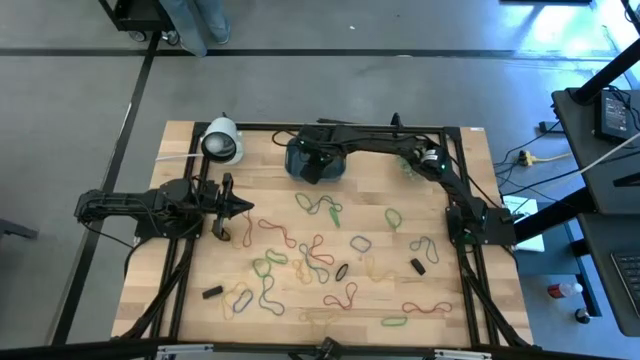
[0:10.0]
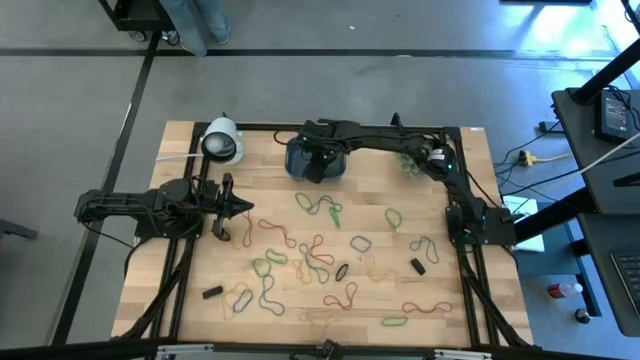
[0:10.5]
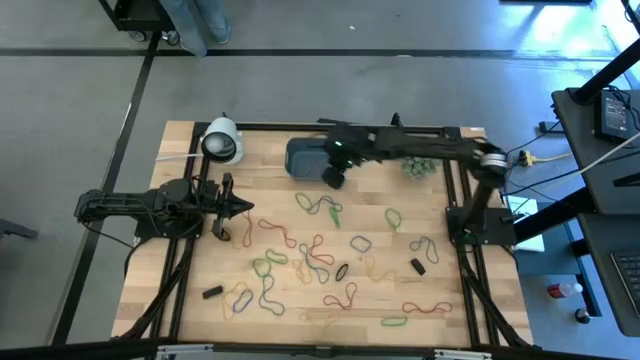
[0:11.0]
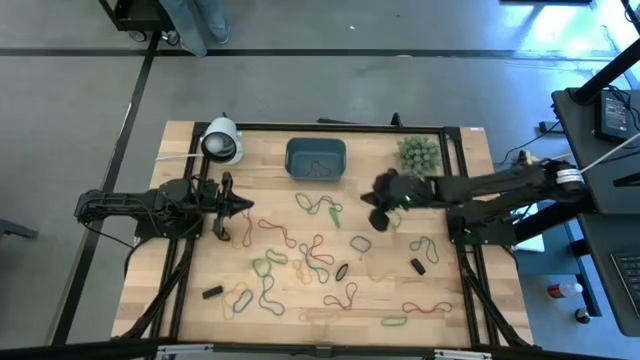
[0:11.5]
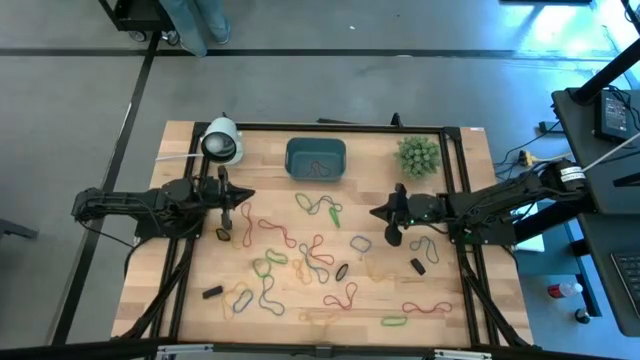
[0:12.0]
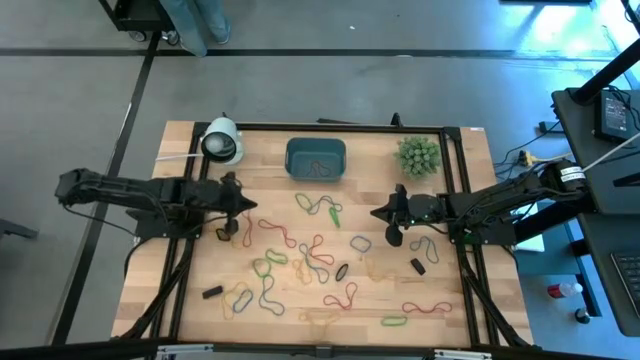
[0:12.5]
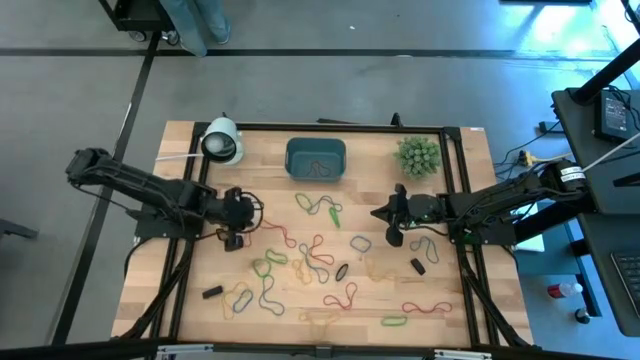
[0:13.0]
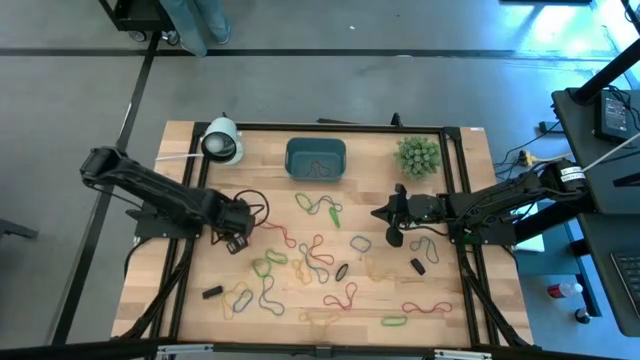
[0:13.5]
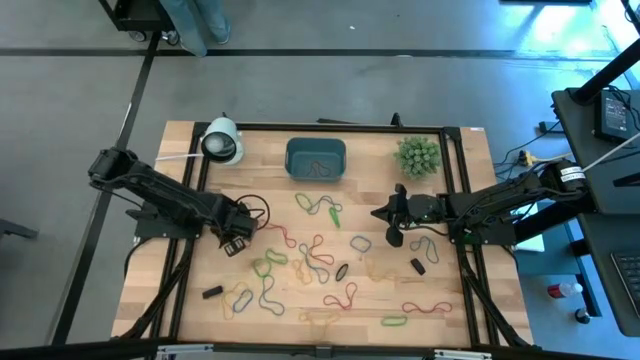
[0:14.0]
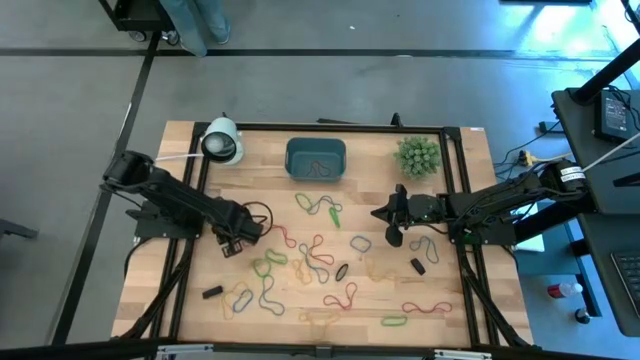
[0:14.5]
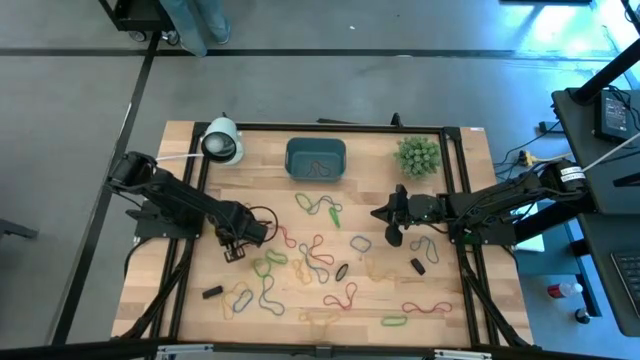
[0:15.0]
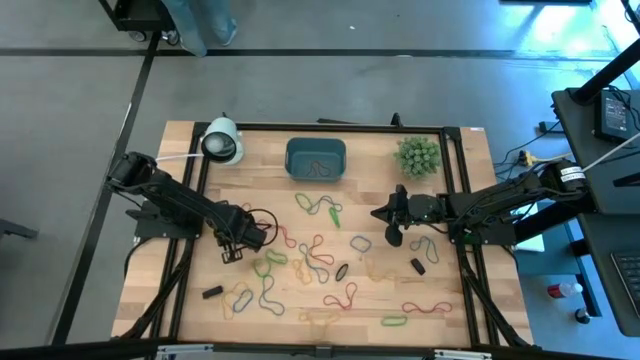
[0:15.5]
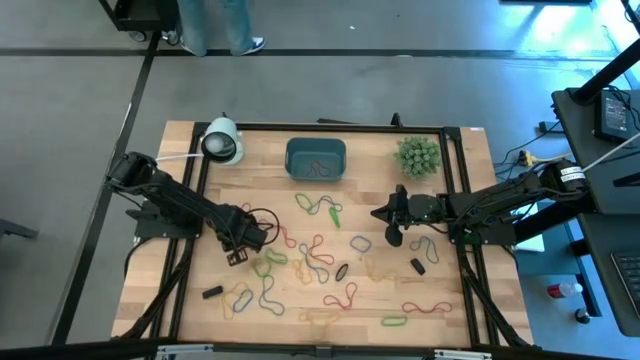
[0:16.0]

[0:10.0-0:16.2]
Task: Pick and place rubber bands into bin
Put the black rubber band into the blue bin

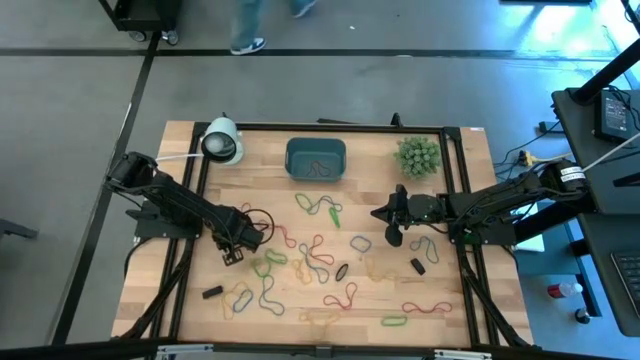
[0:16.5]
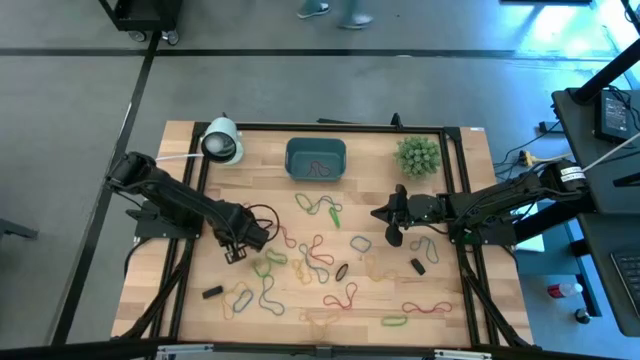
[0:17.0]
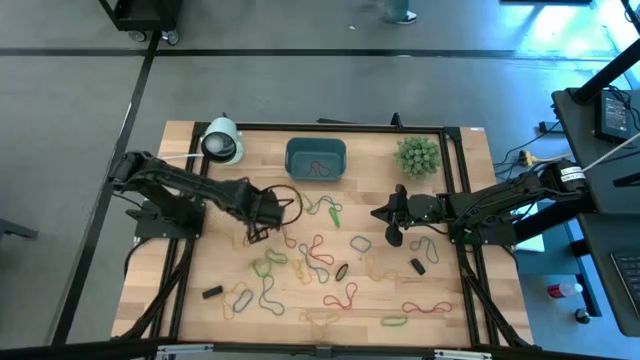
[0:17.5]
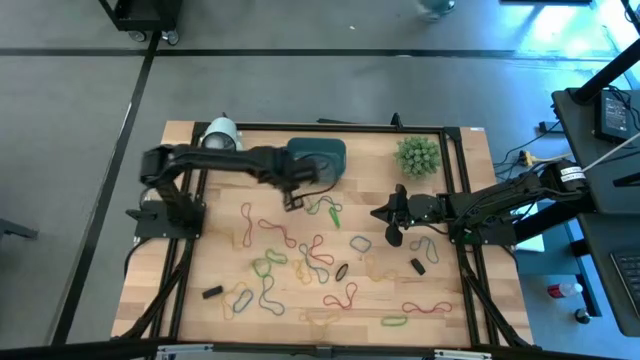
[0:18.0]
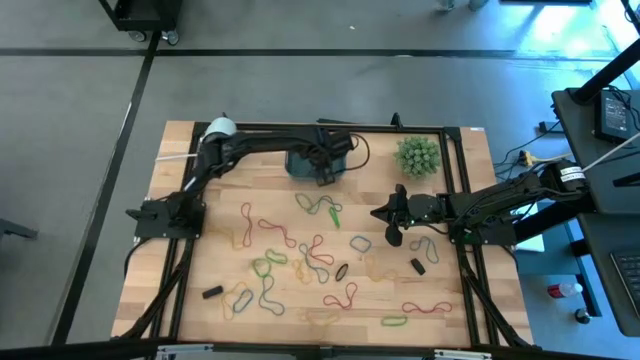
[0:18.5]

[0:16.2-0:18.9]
Put the black rubber band into the blue bin

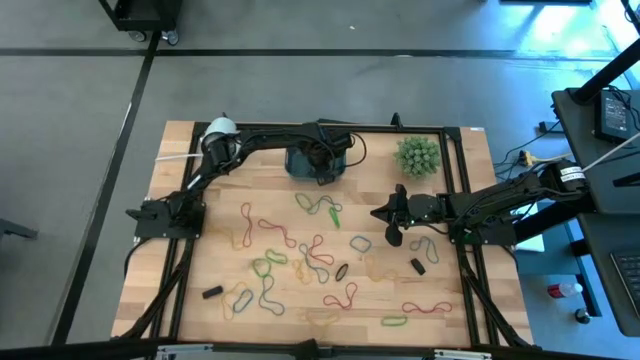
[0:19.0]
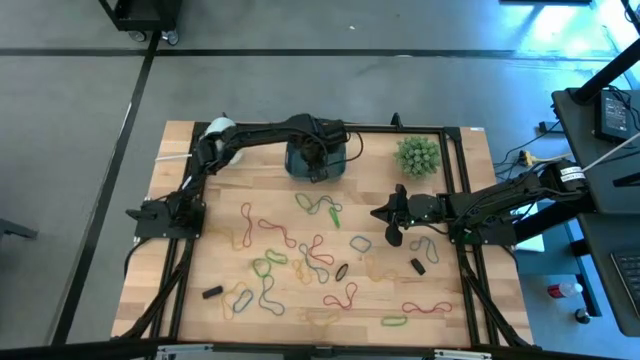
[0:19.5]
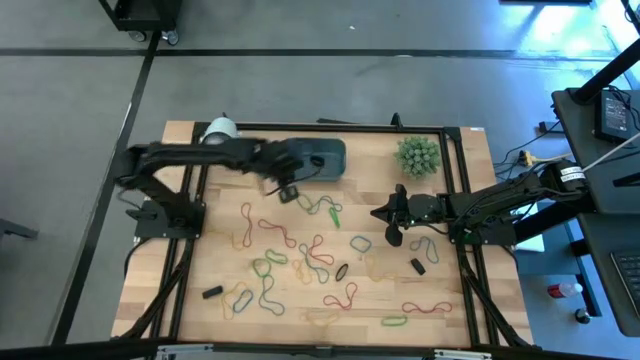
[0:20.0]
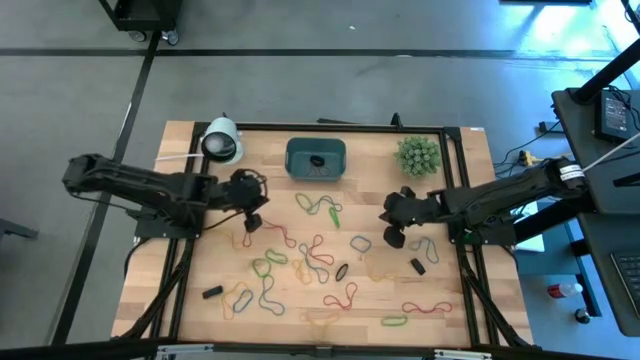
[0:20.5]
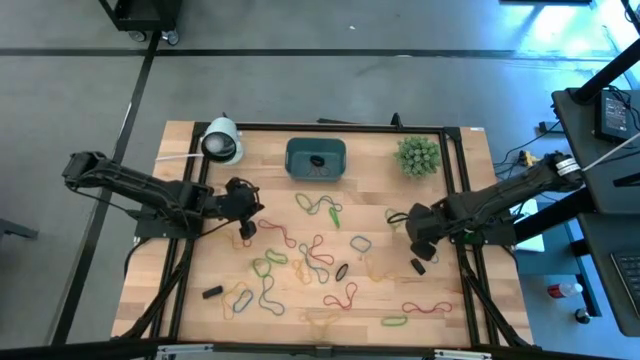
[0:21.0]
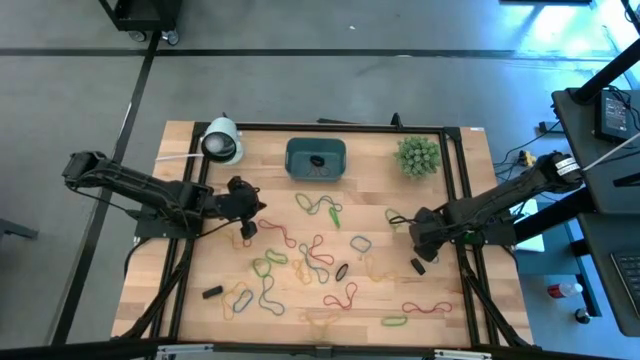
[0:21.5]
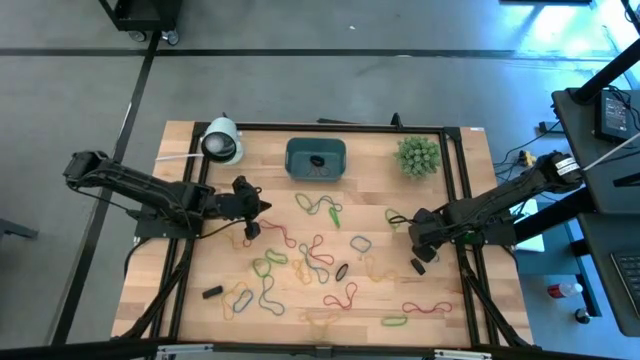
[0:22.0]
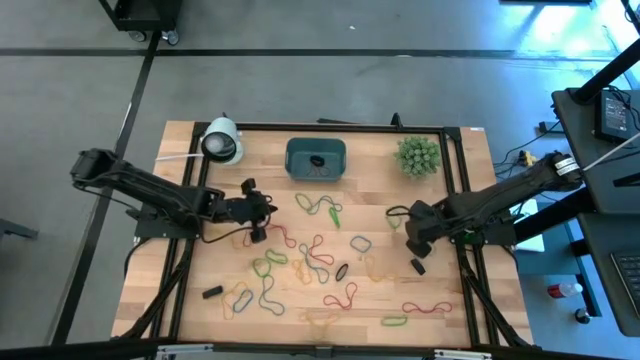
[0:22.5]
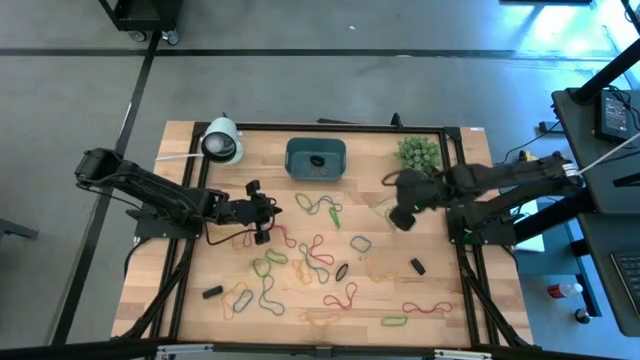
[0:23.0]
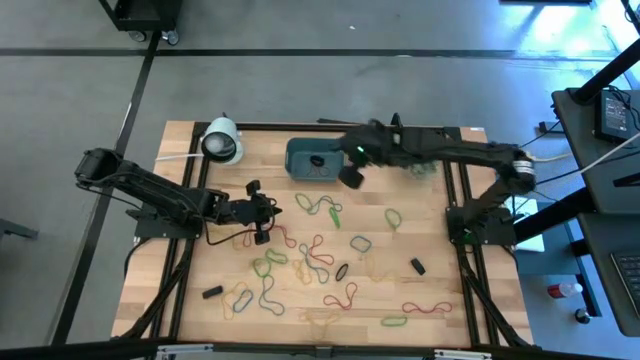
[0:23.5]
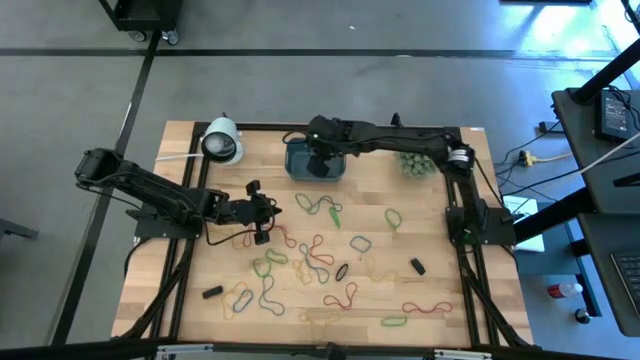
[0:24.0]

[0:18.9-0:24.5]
Put the blue rubber band into the blue bin

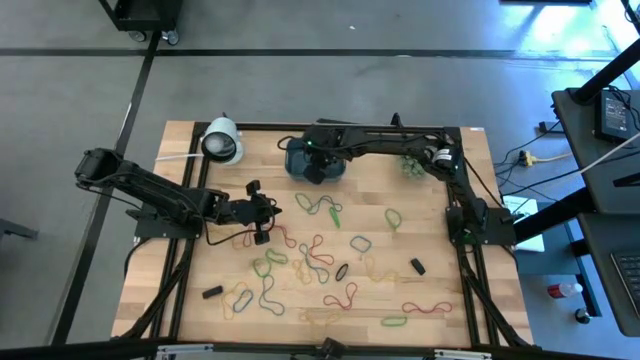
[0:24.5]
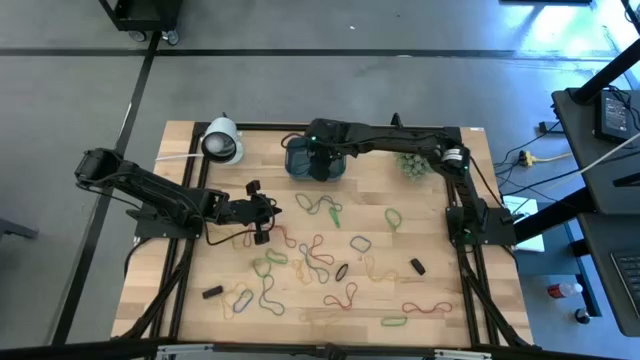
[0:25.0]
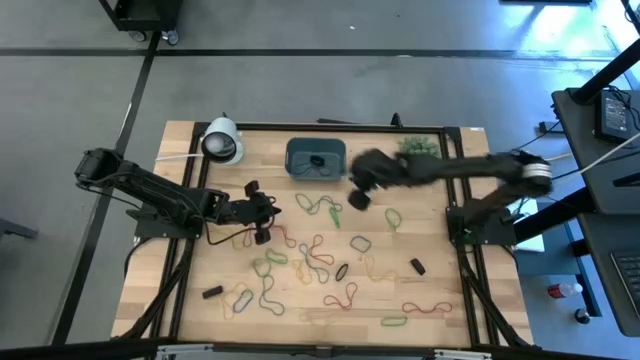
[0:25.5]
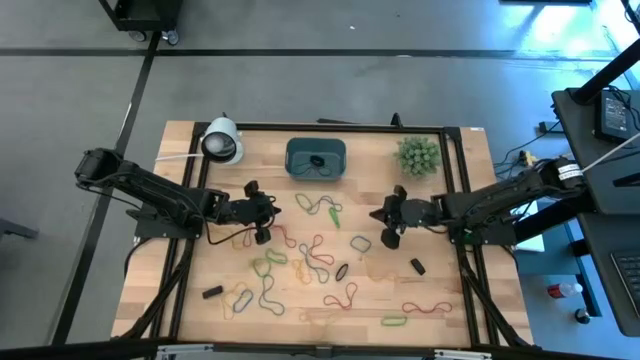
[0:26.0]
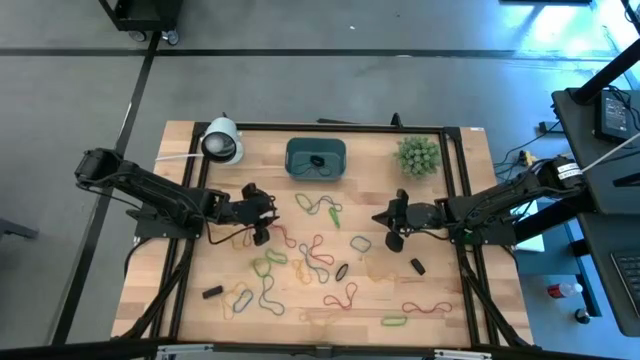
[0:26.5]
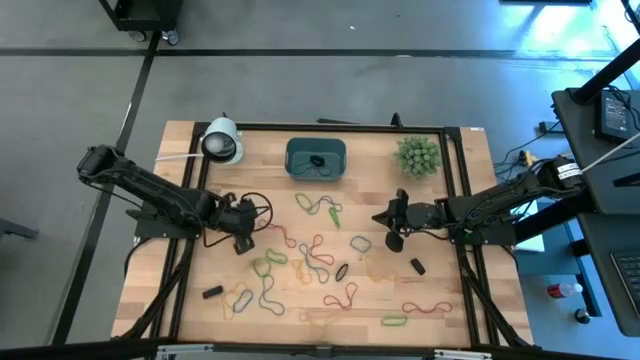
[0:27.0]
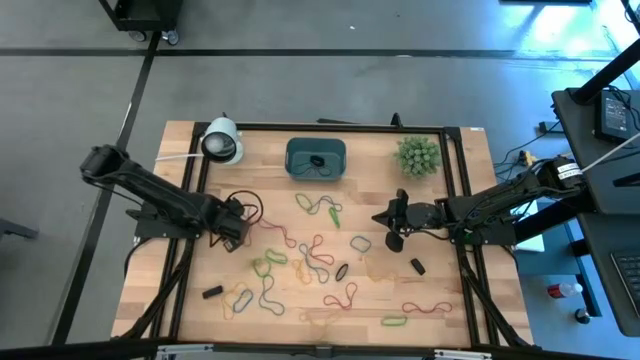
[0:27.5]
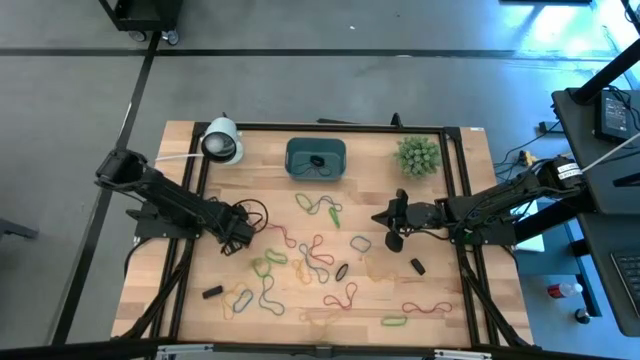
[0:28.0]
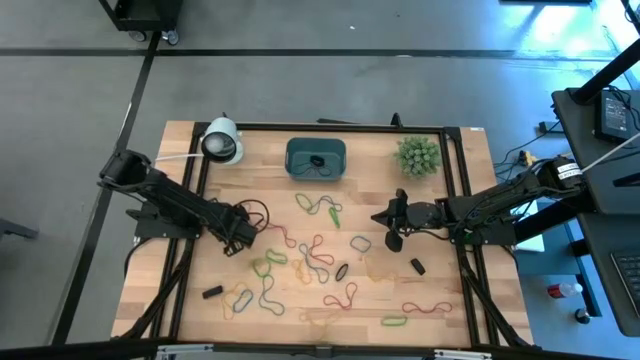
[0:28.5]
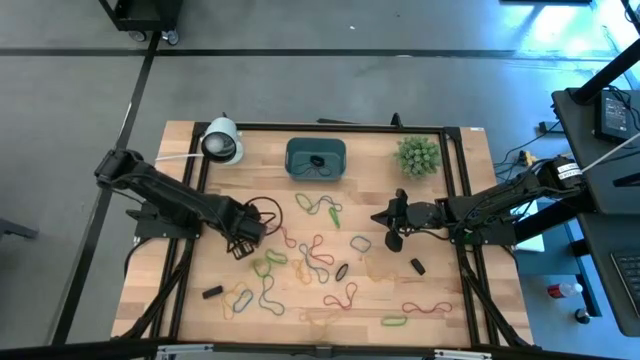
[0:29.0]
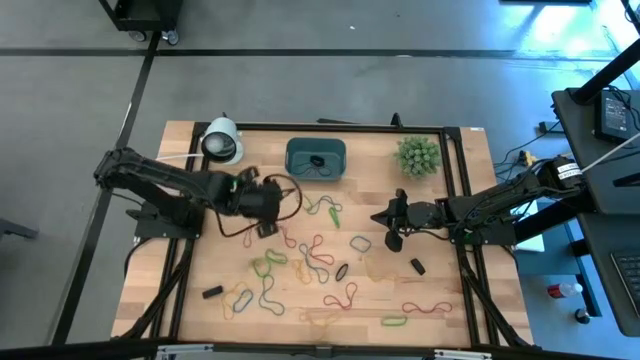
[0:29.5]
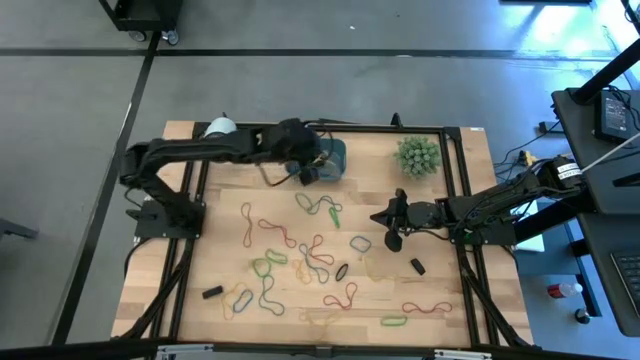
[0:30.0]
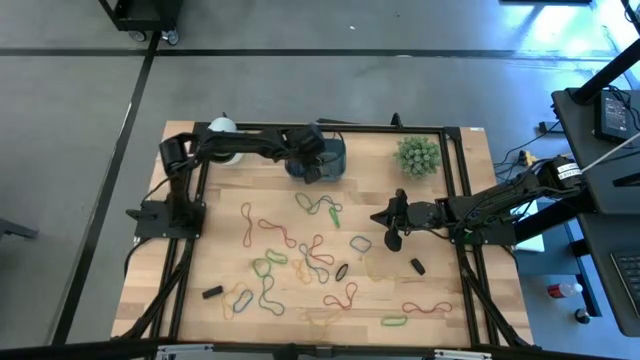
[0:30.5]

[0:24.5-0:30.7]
Put the yellow rubber band into the blue bin
